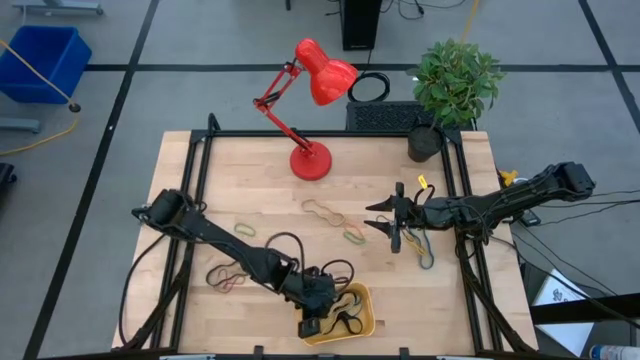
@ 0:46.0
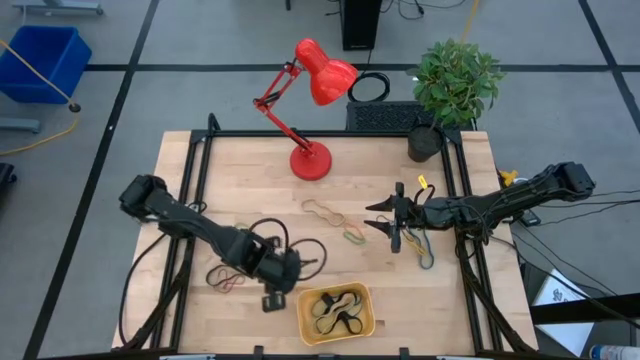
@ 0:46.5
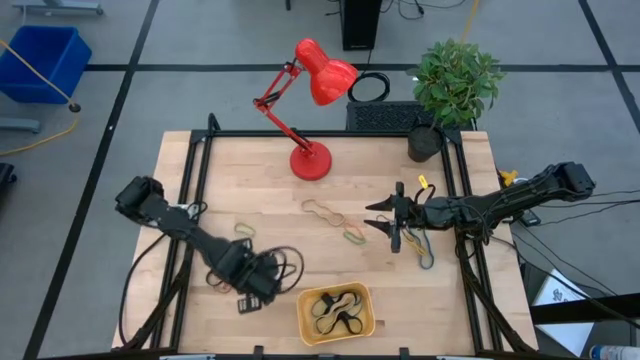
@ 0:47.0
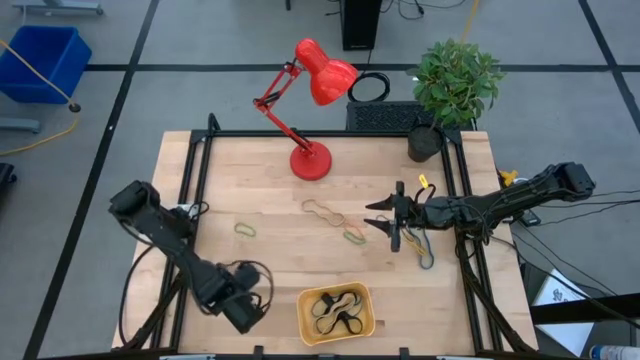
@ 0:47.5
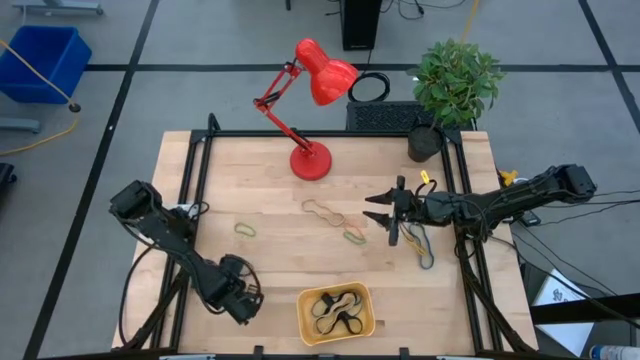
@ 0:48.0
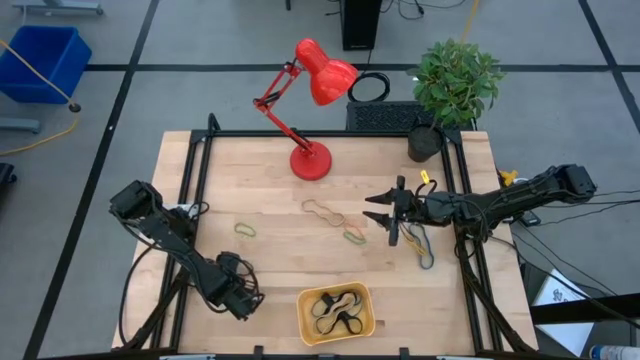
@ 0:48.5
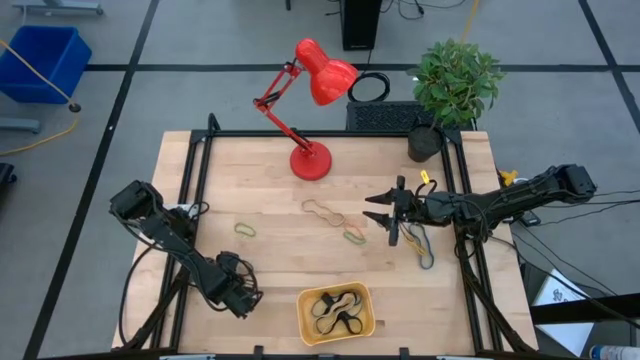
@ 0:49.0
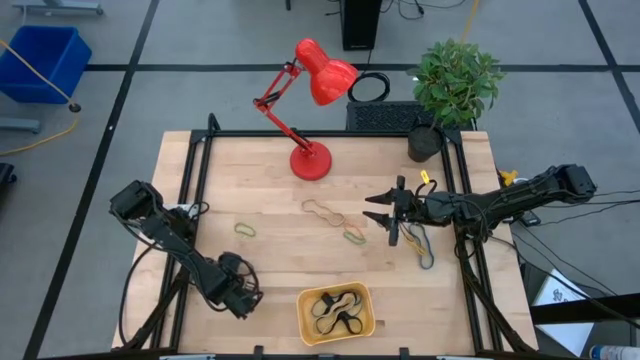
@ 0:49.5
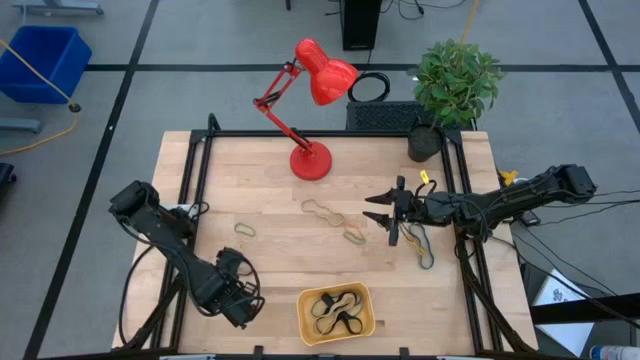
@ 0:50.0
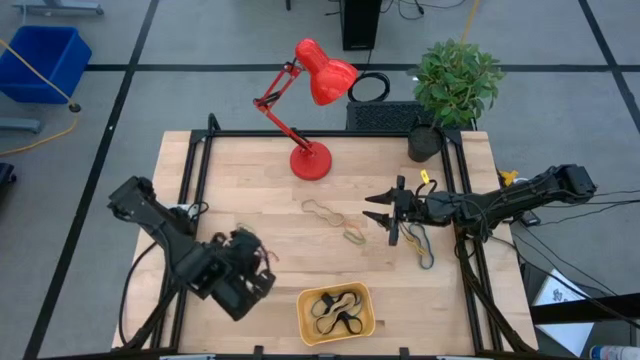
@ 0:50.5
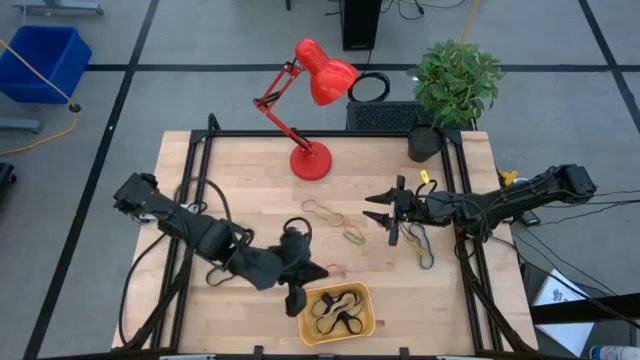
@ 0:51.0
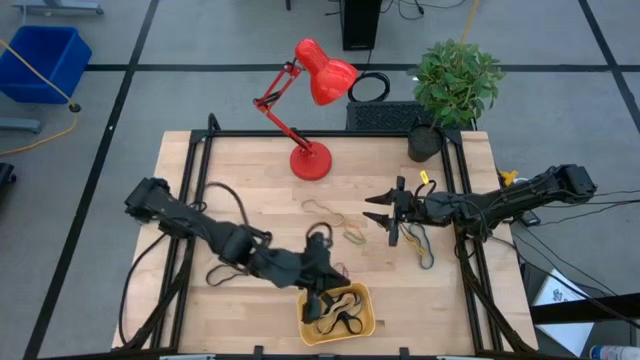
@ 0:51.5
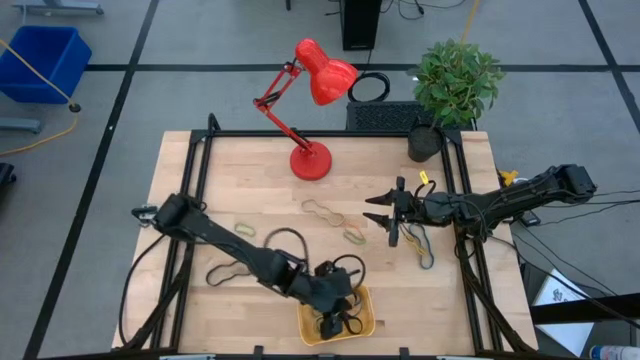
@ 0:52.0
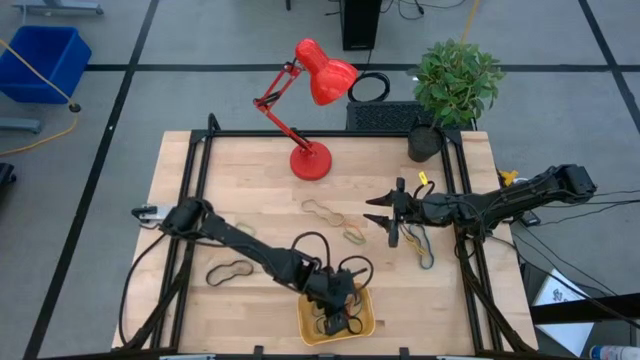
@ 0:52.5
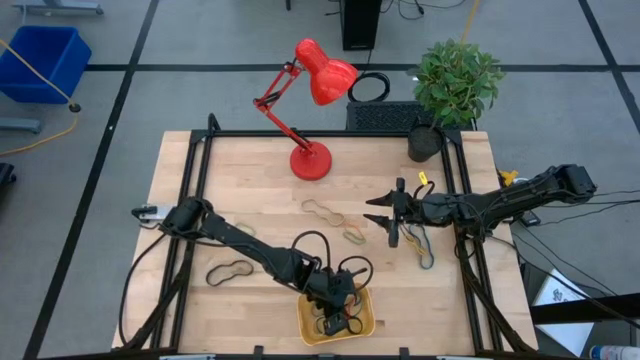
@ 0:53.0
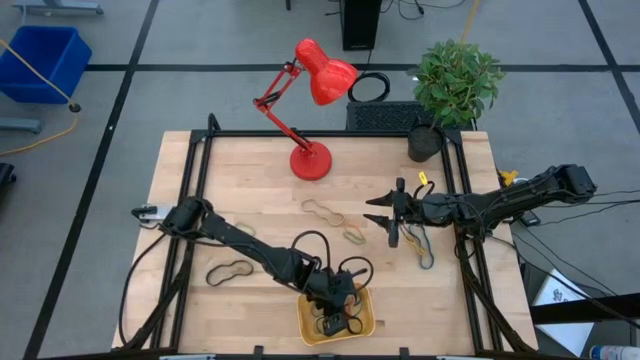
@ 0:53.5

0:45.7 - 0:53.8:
Task: Pick and place rubber bands into bin
Put the red rubber band into the yellow bin

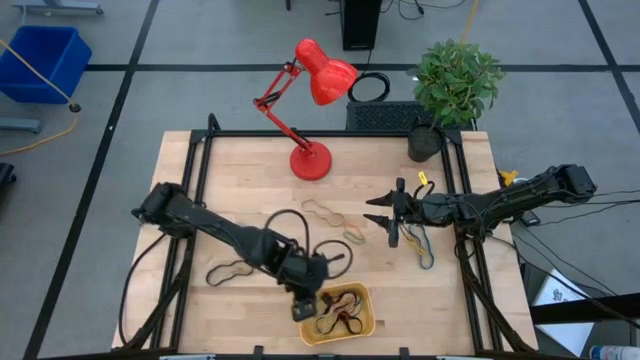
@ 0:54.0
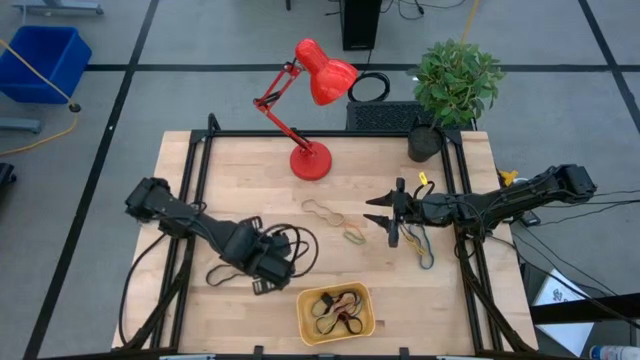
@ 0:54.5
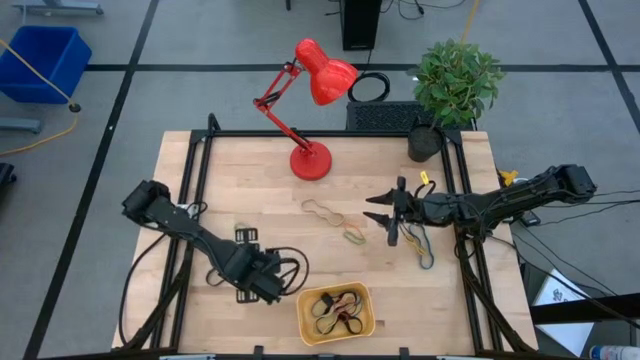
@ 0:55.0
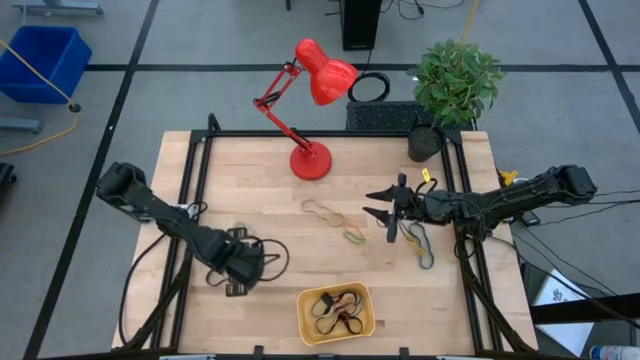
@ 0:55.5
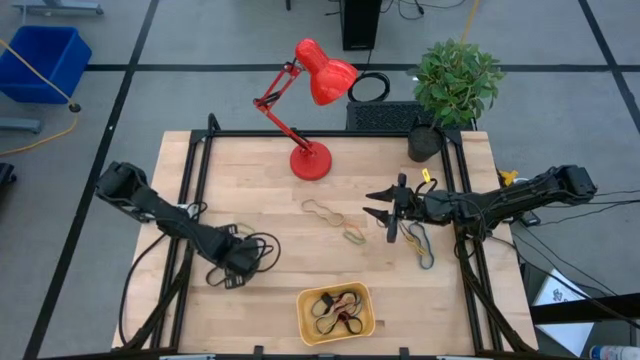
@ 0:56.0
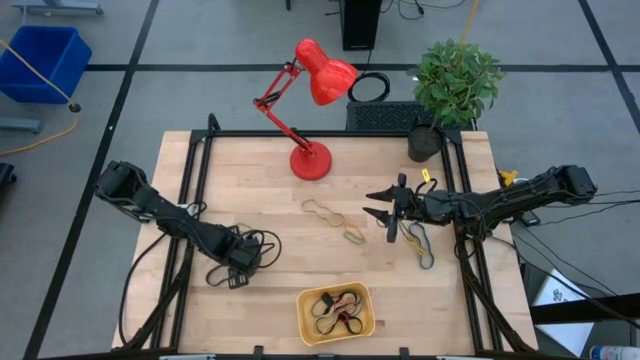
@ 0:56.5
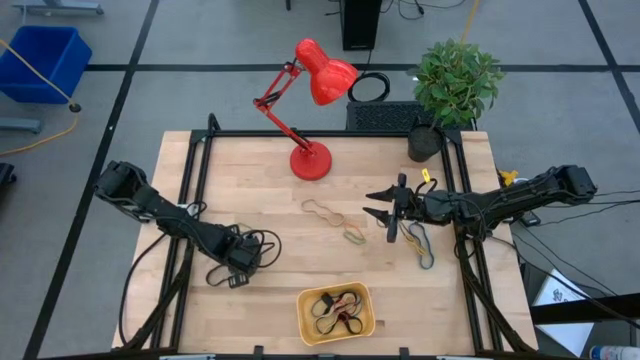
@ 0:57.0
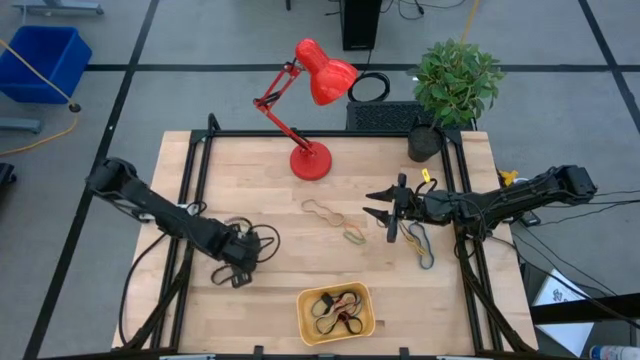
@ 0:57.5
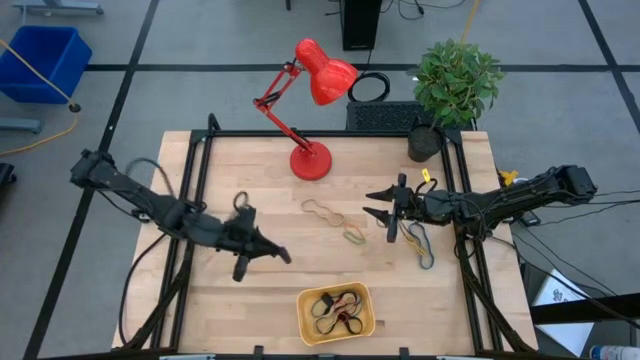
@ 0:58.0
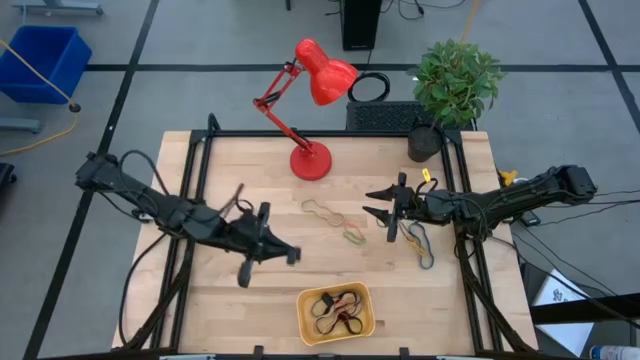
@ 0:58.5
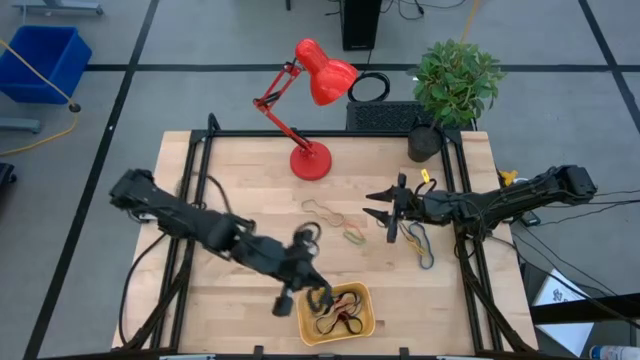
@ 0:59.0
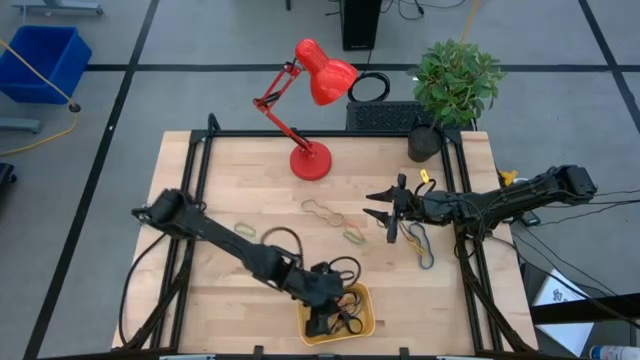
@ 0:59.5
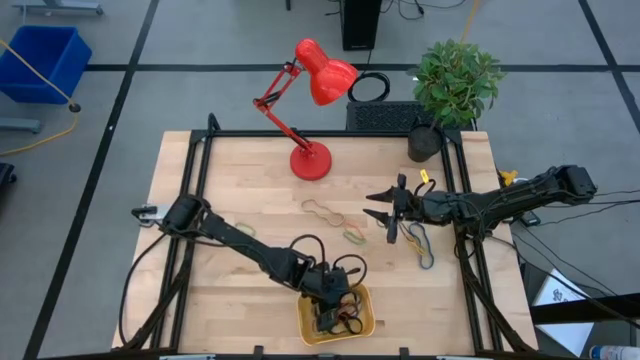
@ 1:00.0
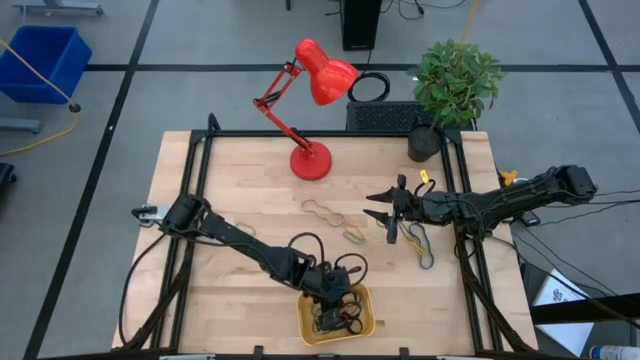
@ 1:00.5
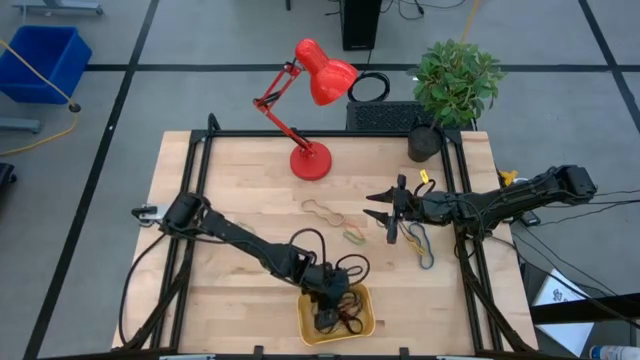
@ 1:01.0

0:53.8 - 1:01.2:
Put the black rubber band into the yellow bin

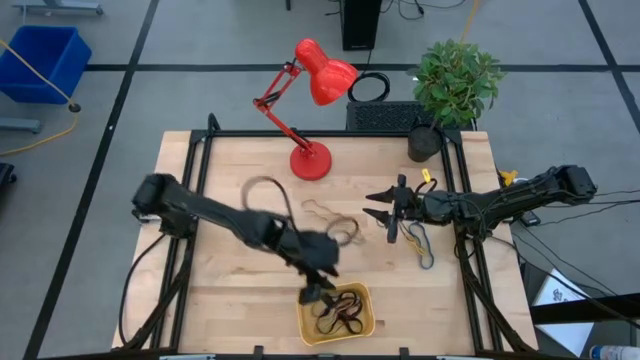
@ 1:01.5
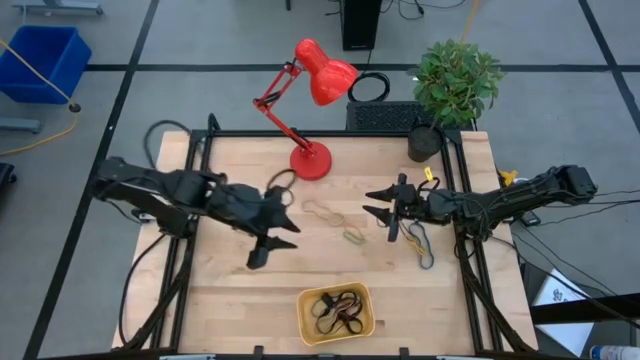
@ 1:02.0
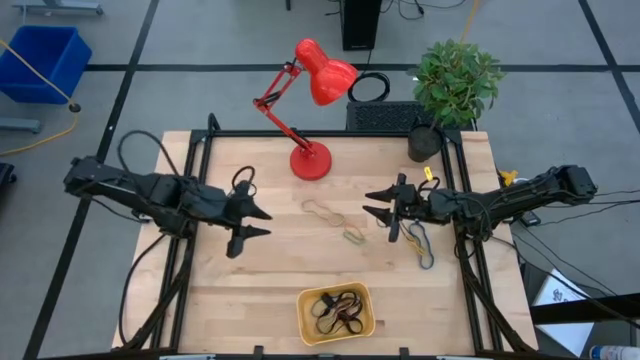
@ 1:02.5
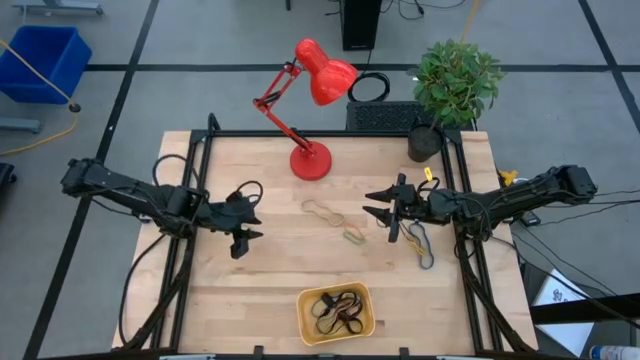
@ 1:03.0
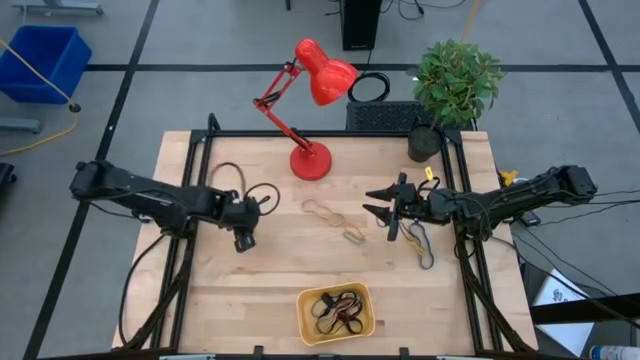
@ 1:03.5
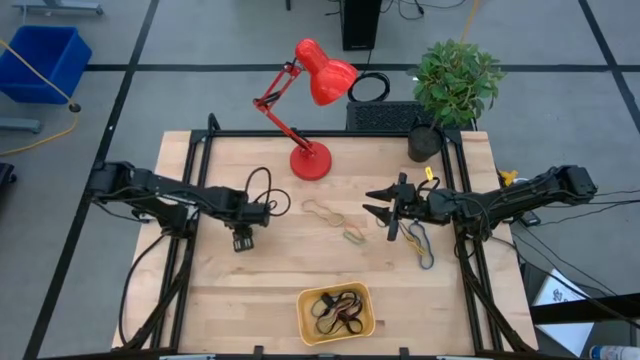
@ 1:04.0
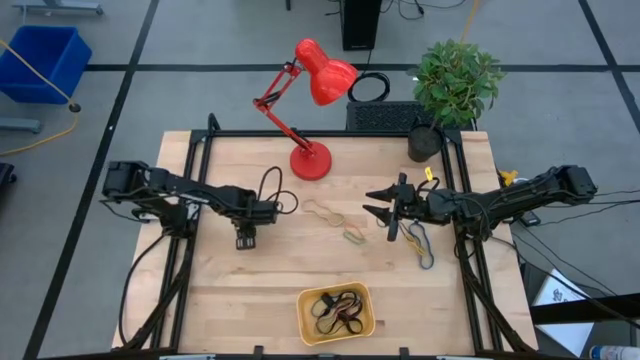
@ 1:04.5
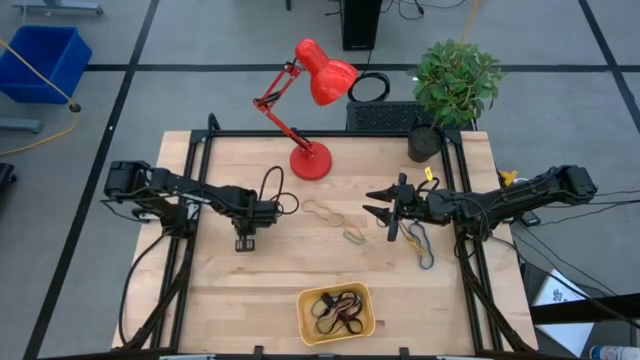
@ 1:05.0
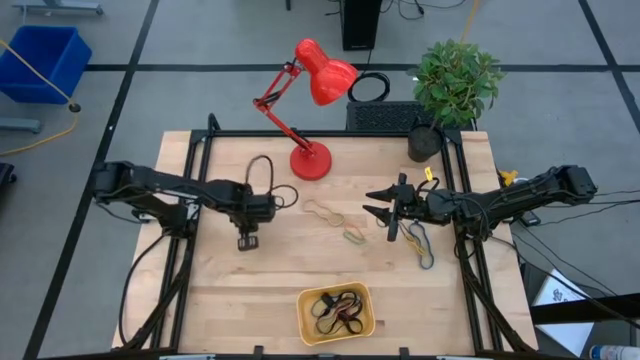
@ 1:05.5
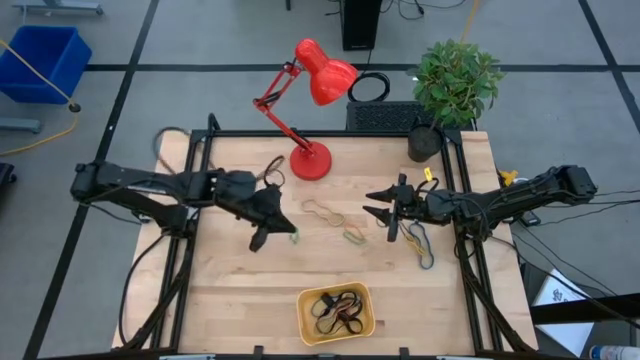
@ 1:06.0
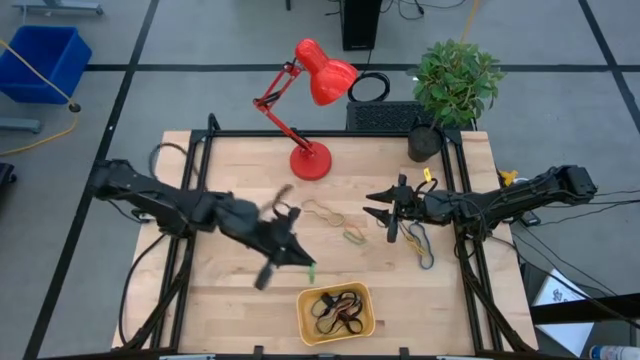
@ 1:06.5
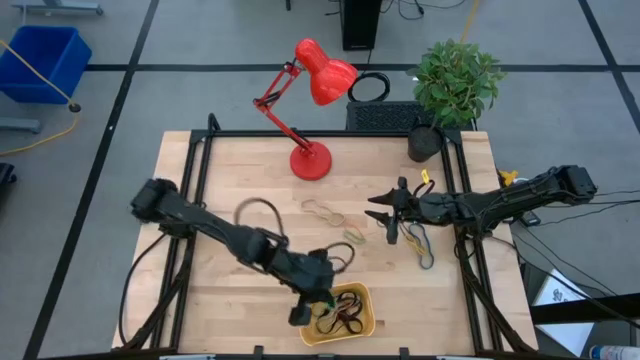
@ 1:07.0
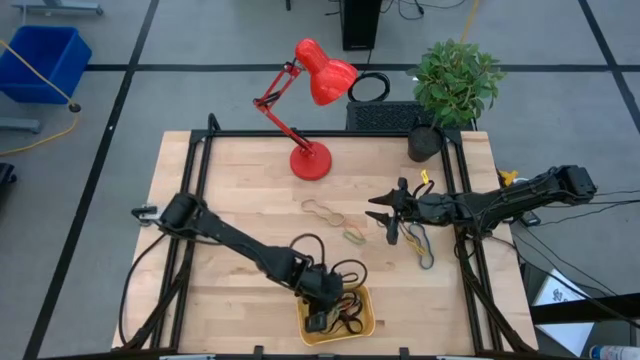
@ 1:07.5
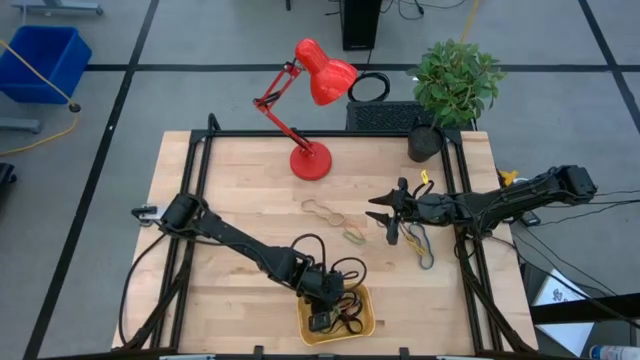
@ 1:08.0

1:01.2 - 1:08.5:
Put the green rubber band into the yellow bin
